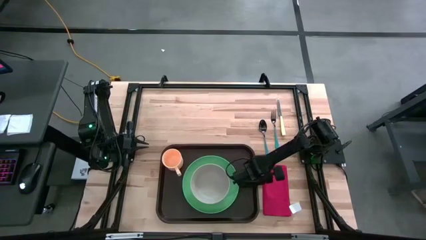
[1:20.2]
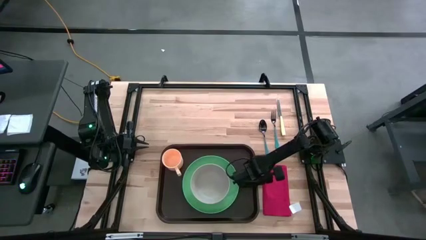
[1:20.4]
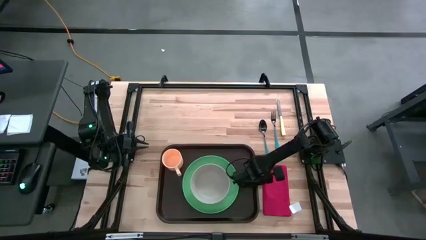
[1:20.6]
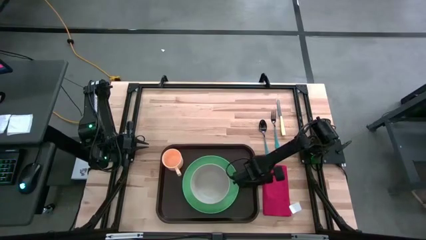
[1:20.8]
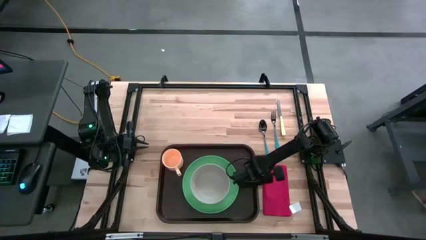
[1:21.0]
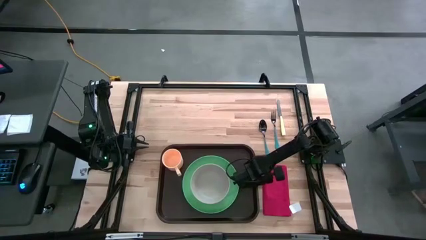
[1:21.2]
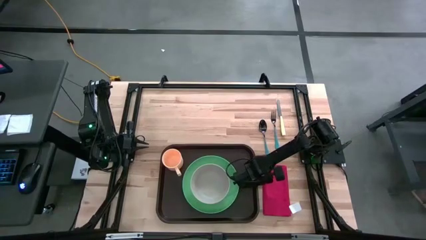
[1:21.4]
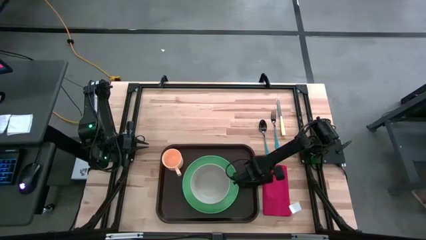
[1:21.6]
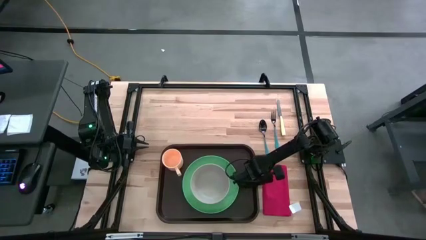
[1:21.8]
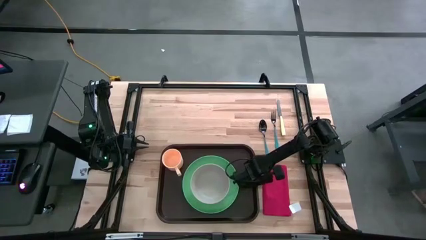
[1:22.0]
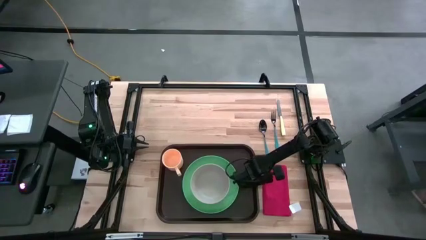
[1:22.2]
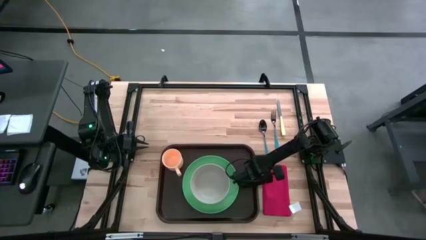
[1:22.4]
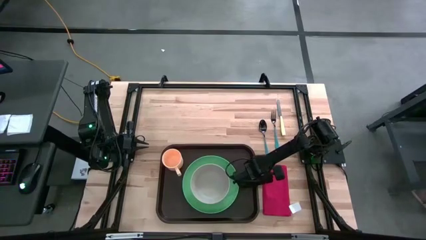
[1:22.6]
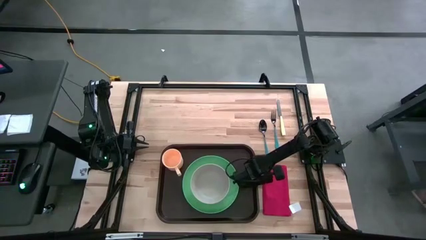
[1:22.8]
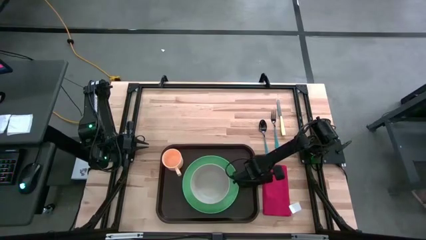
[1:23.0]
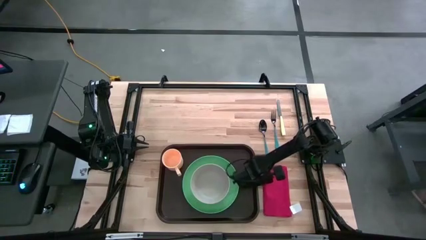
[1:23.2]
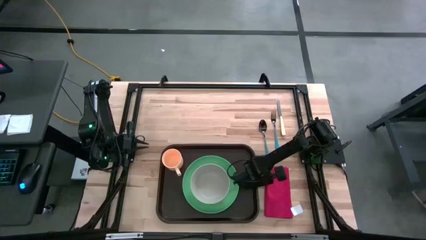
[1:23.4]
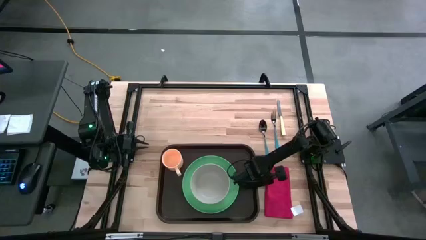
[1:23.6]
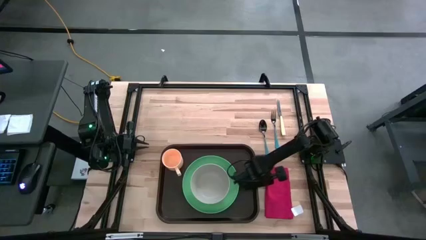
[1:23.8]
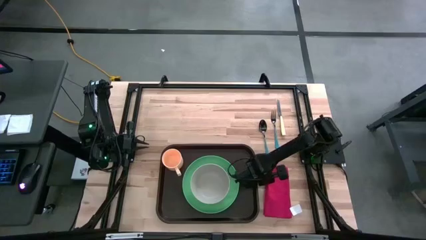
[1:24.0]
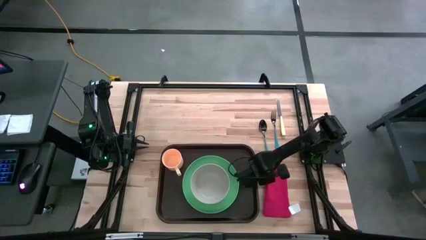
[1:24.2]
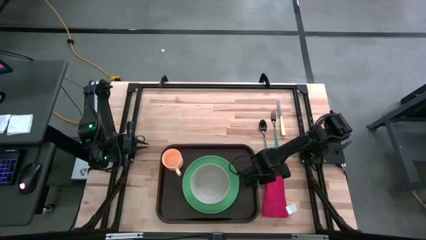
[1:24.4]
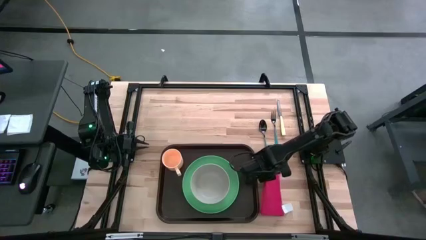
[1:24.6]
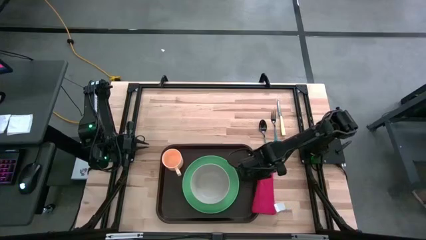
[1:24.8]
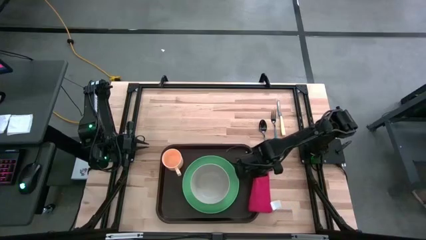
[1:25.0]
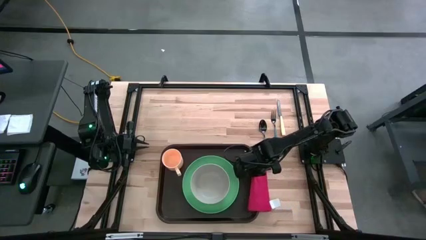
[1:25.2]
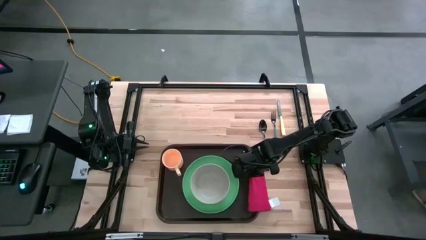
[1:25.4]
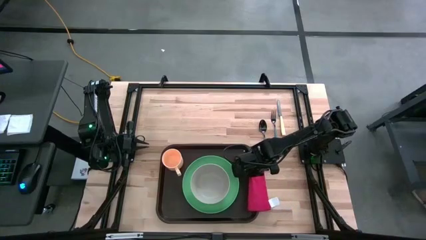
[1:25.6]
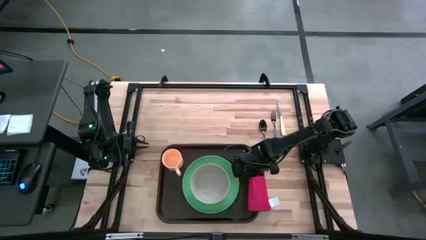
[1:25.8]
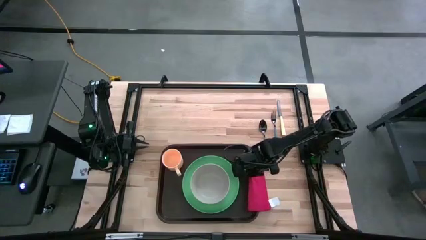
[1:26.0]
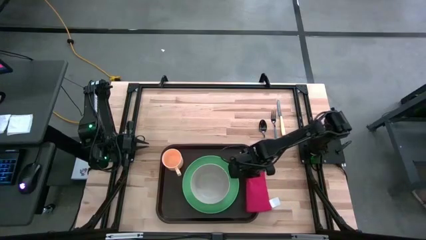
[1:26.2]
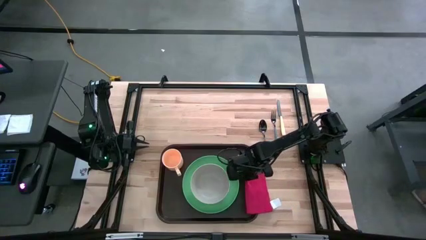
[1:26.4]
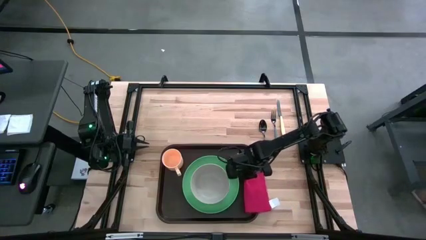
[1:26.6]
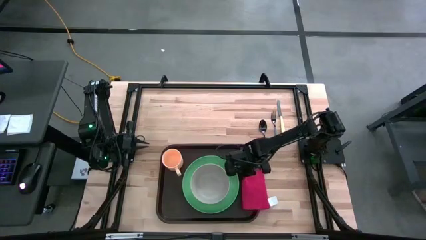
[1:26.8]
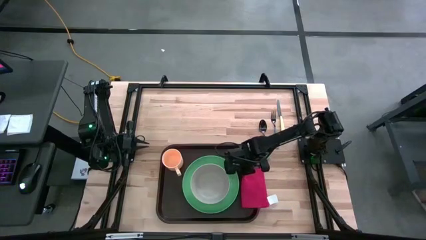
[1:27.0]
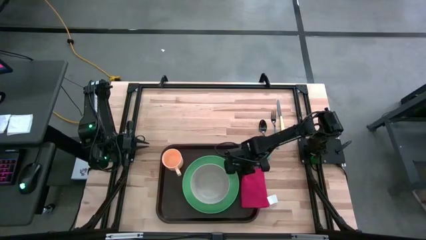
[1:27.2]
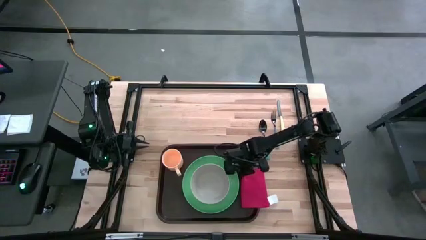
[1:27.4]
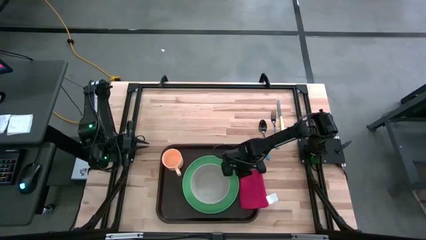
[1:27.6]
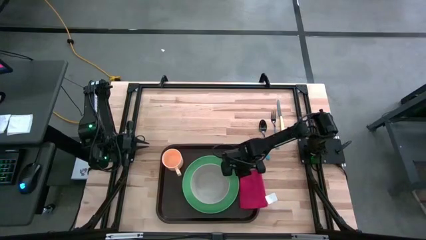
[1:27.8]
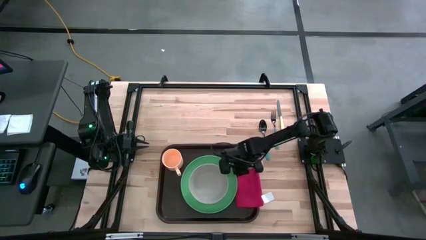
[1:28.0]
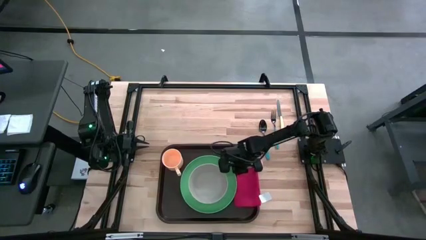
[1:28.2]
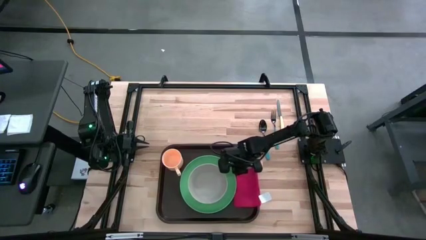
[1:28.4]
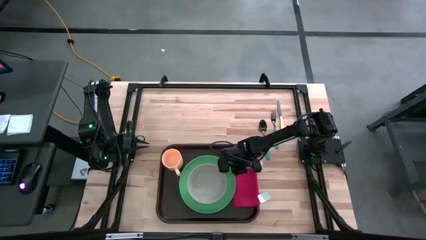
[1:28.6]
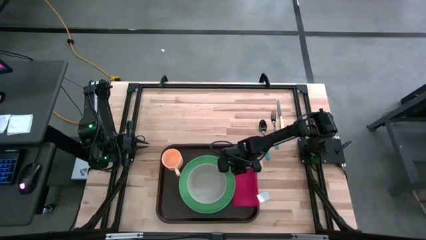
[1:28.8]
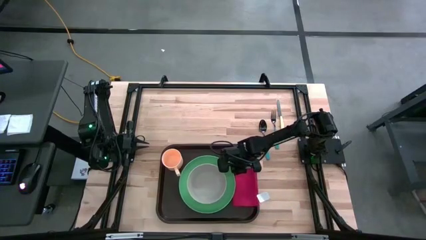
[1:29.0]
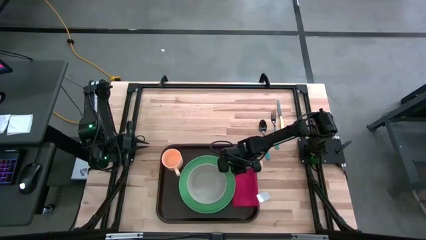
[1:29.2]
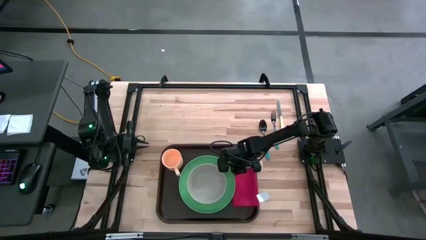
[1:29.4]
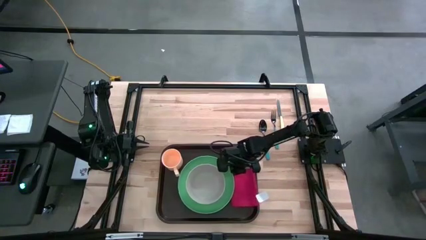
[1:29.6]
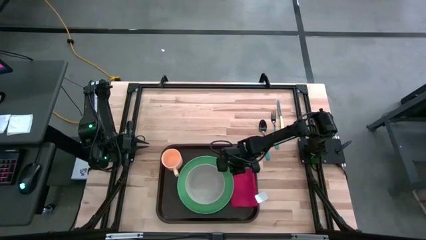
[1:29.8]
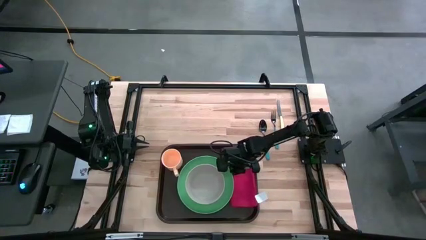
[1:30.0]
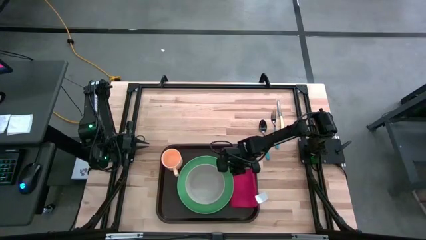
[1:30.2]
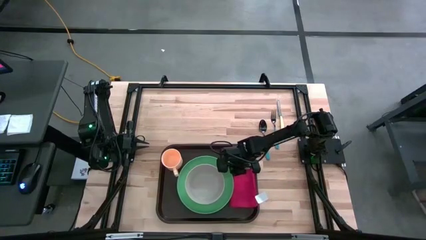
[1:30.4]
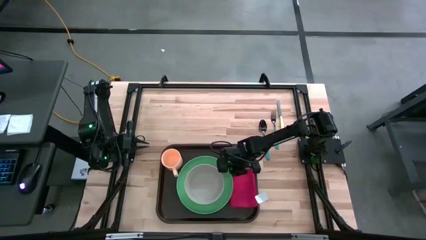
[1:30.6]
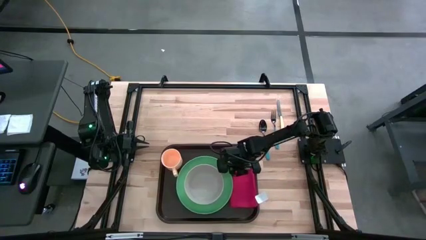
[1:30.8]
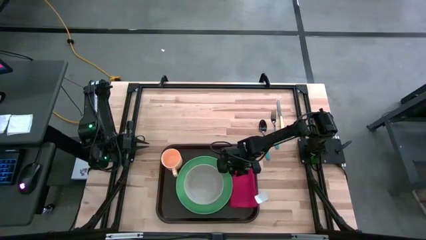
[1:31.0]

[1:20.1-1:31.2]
Task: Set up tray
Put the red napkin on the black serving tray to the right of the green plate

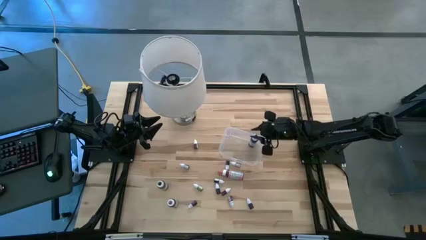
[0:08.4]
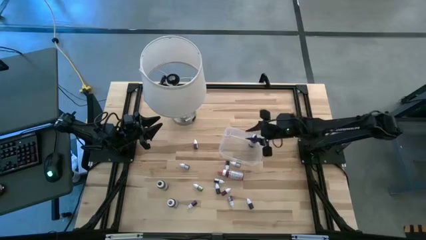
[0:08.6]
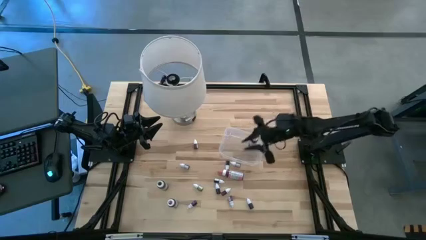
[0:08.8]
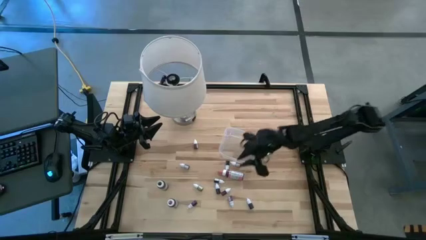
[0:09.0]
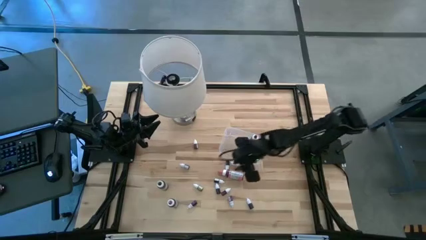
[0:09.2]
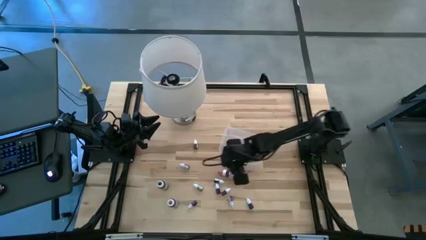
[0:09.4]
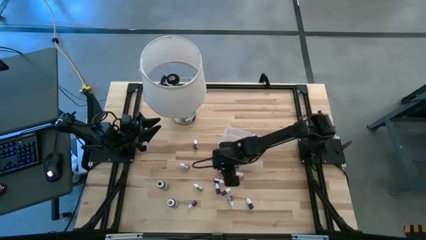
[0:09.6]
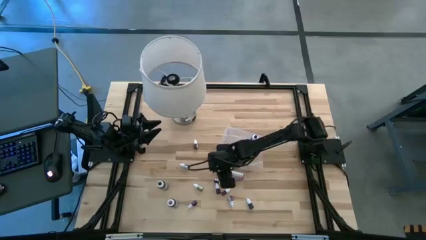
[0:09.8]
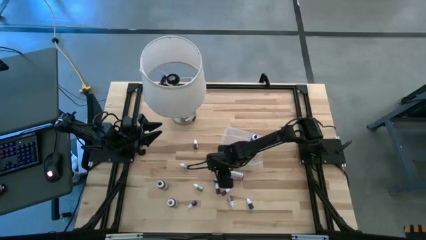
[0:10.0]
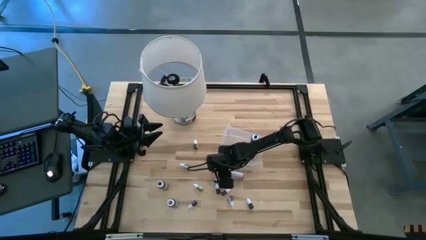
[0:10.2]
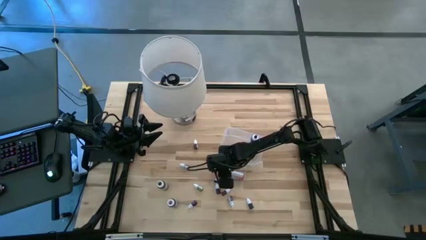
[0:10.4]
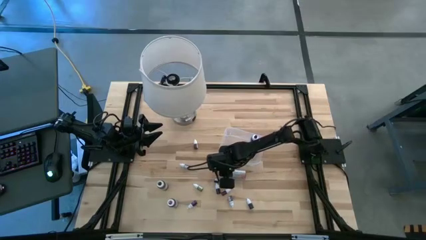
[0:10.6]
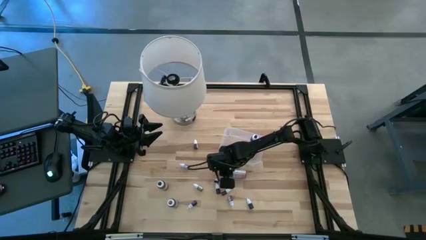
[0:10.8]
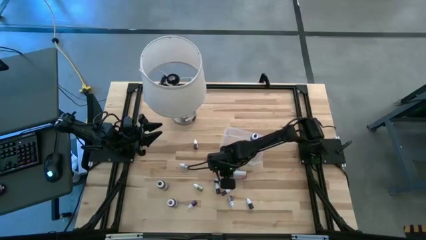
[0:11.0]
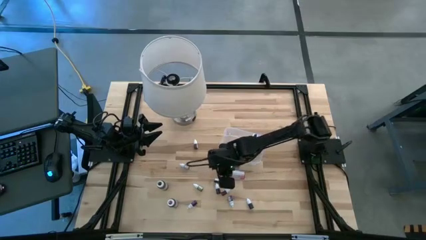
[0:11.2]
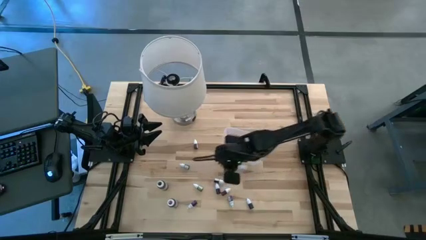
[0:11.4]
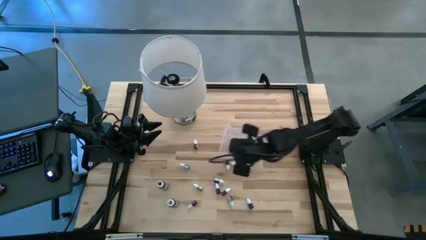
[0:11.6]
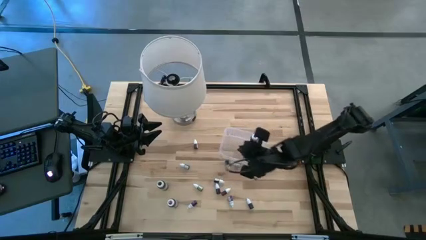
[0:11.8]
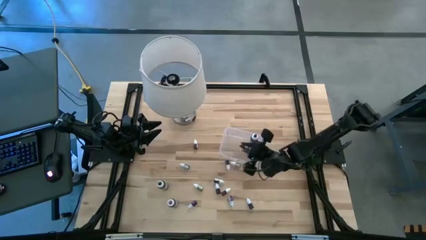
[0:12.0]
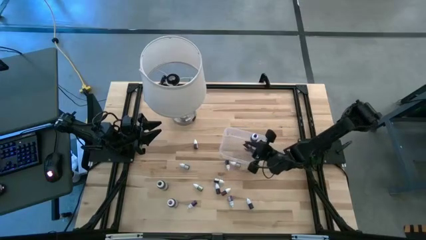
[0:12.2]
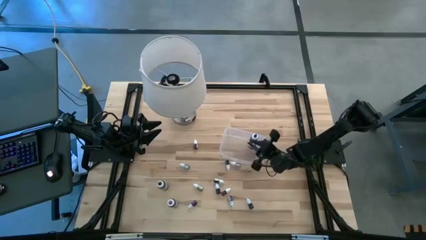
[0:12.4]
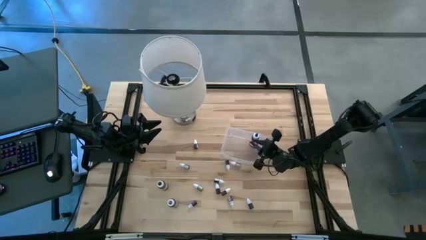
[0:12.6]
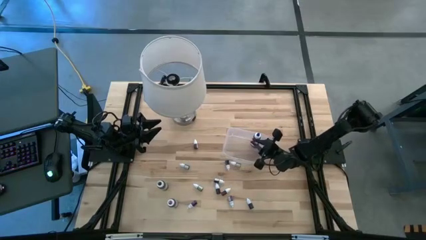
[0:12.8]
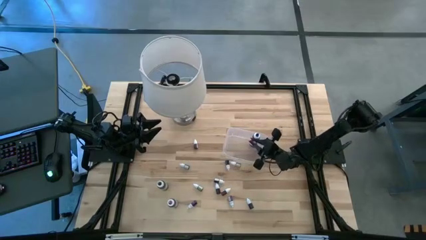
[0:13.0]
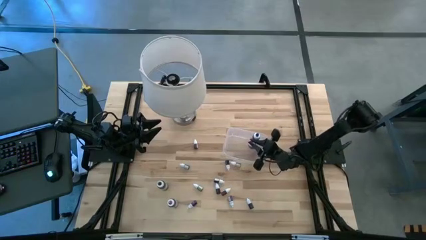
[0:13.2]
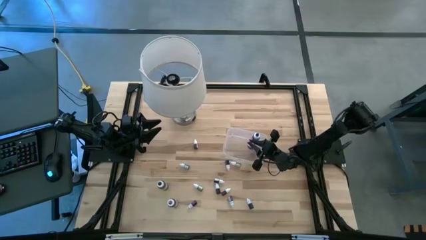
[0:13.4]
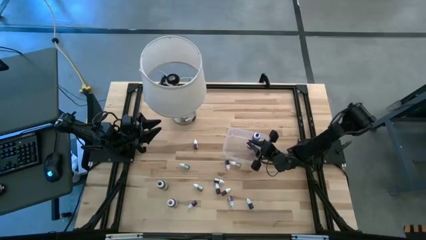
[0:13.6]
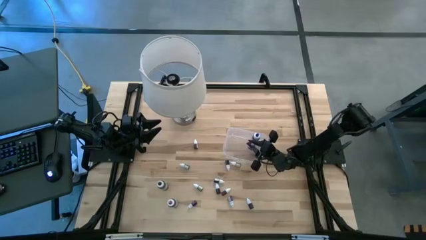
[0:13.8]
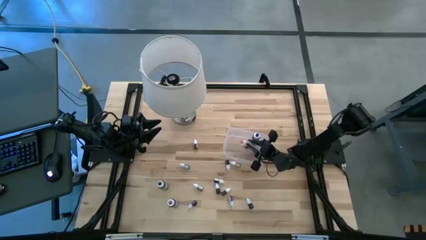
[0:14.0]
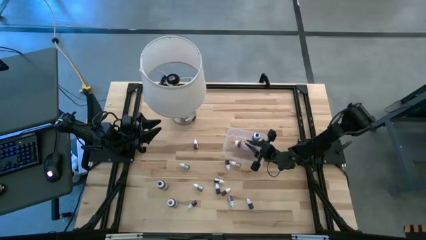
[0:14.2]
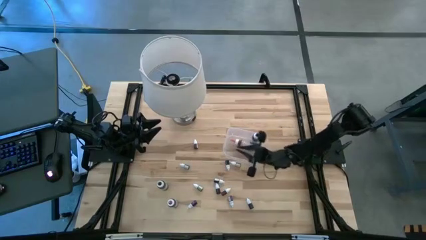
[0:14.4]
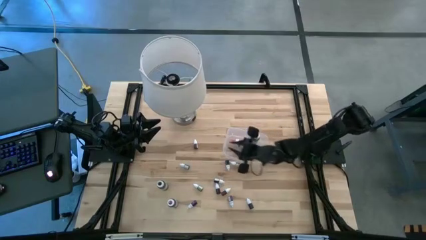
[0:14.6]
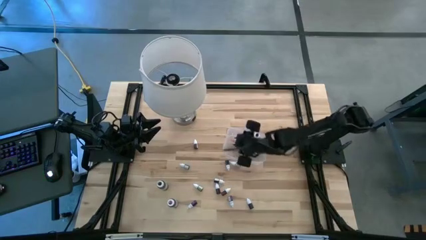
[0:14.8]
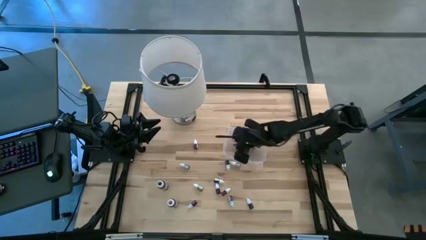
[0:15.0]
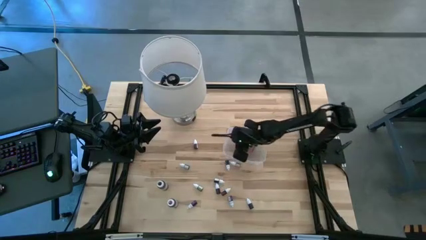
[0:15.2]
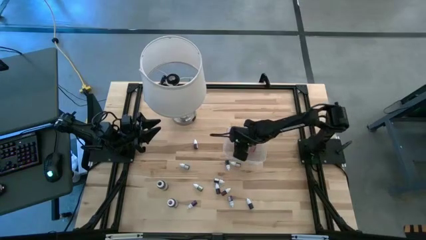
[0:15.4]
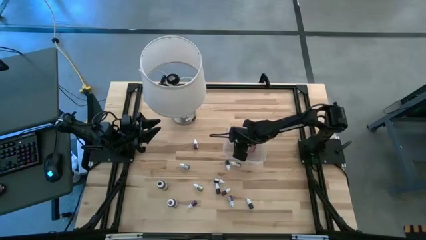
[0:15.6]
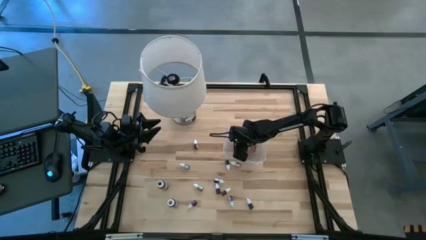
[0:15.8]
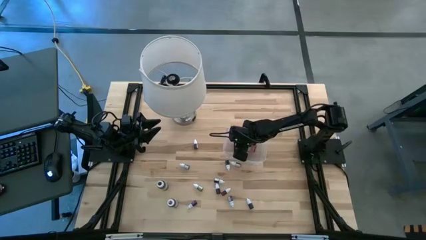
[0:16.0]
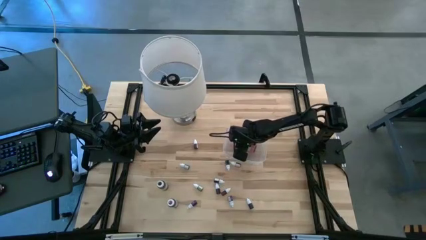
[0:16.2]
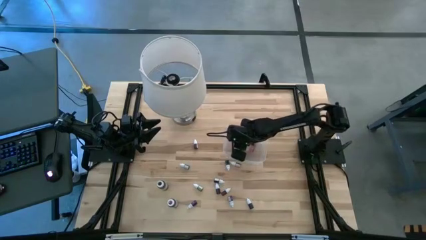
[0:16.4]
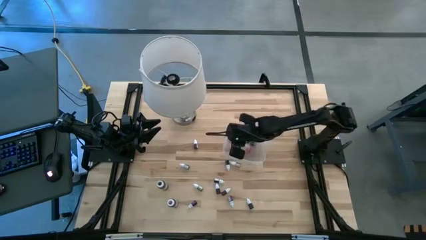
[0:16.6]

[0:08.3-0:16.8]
Task: Pick & Place food coloring
Put the large pink food coloring bottle into the transparent bin
